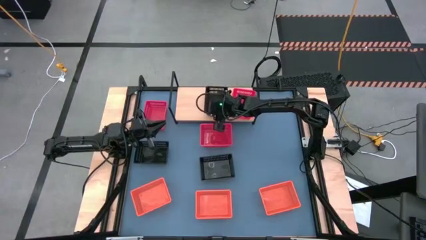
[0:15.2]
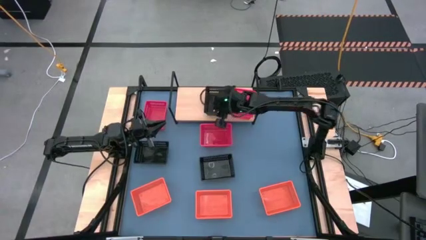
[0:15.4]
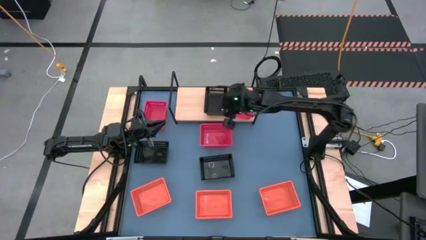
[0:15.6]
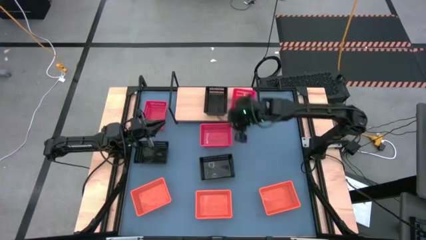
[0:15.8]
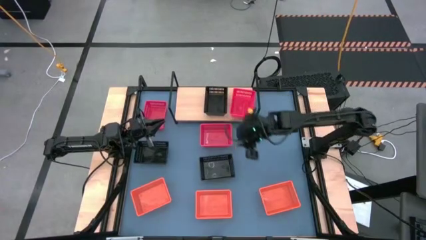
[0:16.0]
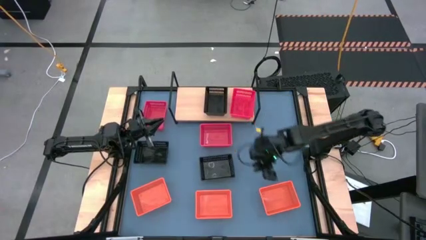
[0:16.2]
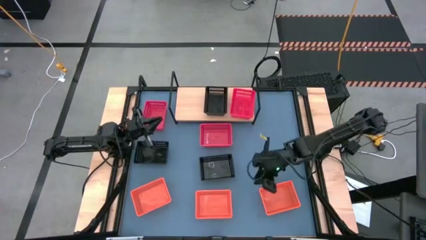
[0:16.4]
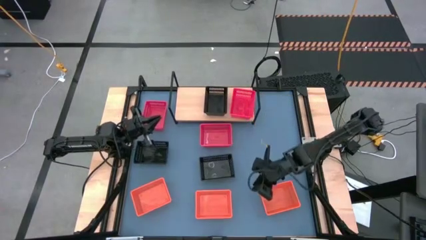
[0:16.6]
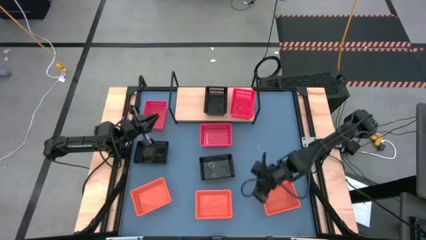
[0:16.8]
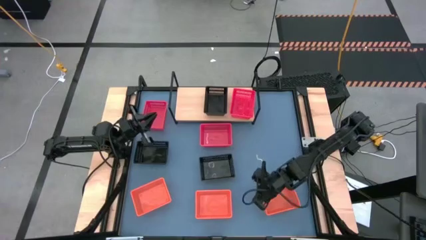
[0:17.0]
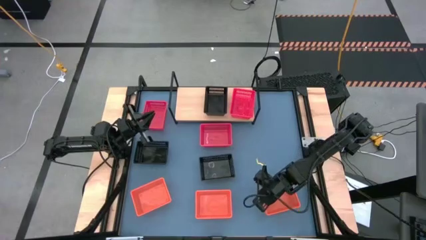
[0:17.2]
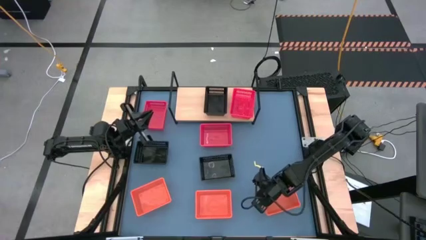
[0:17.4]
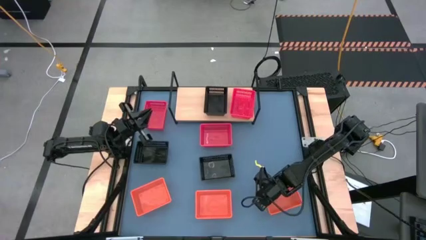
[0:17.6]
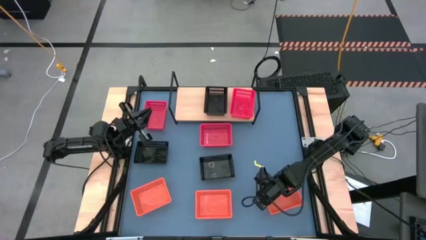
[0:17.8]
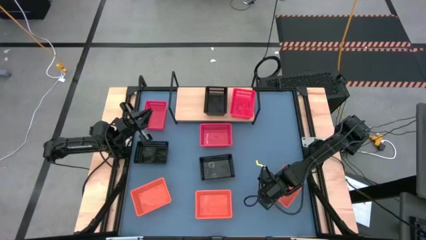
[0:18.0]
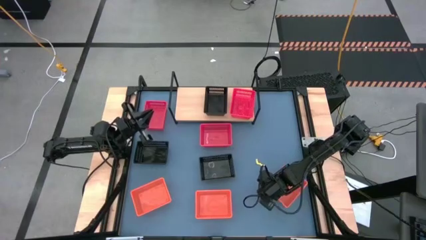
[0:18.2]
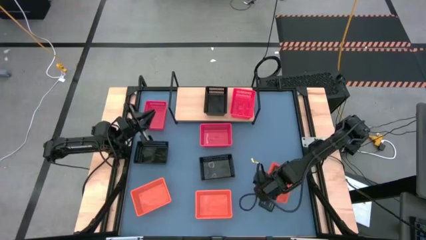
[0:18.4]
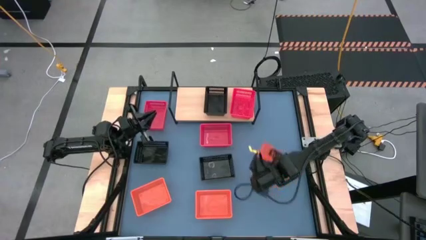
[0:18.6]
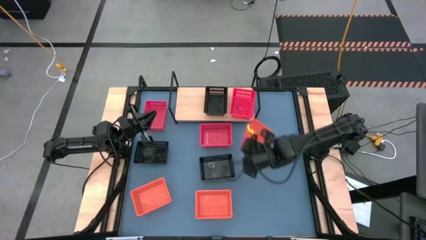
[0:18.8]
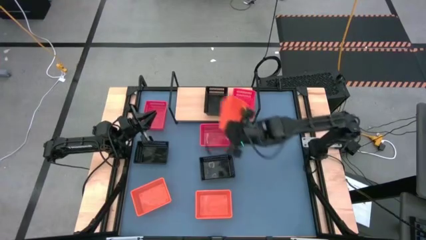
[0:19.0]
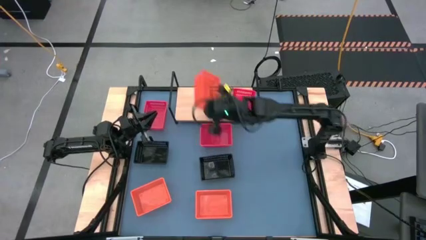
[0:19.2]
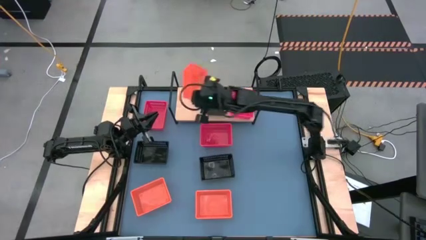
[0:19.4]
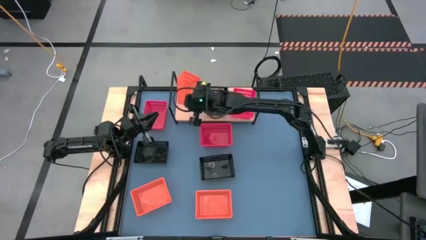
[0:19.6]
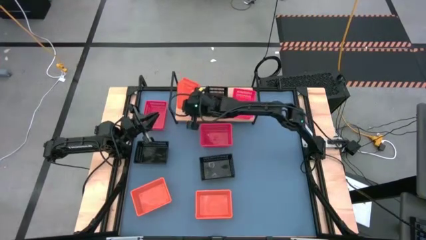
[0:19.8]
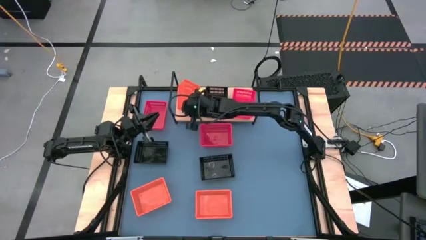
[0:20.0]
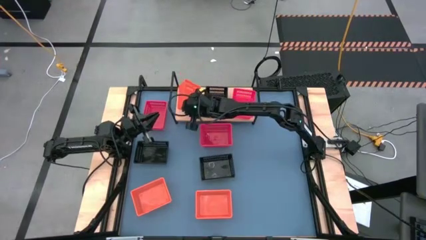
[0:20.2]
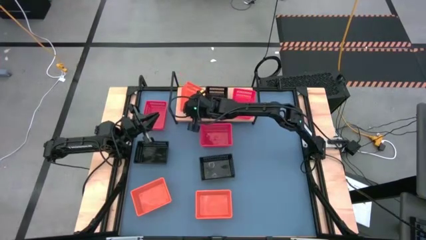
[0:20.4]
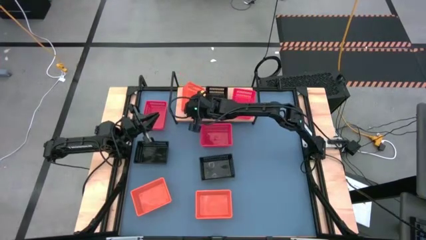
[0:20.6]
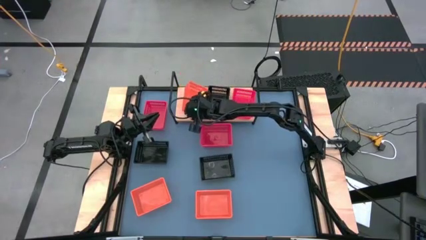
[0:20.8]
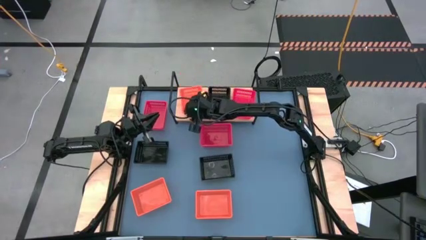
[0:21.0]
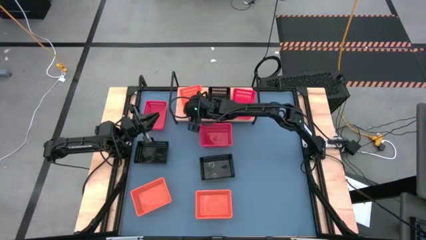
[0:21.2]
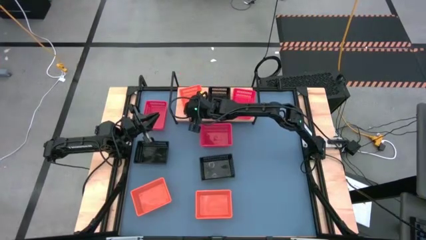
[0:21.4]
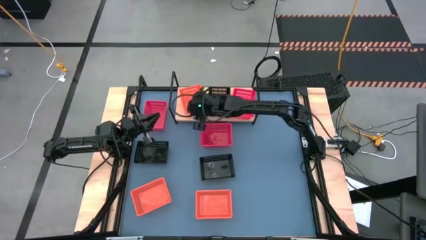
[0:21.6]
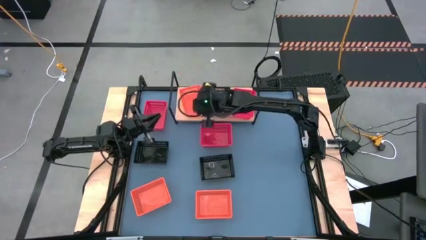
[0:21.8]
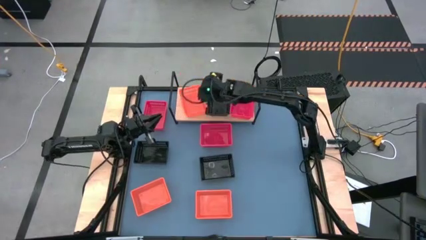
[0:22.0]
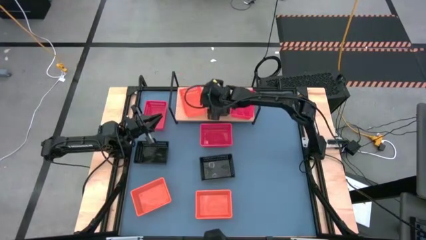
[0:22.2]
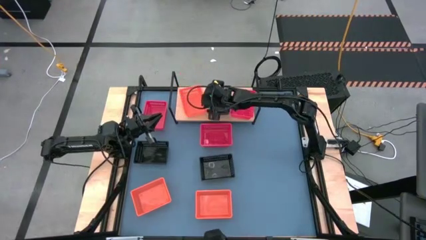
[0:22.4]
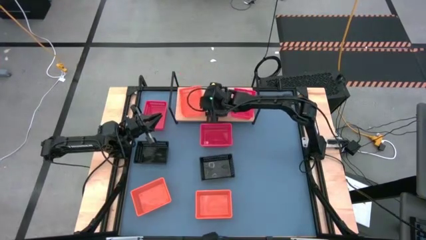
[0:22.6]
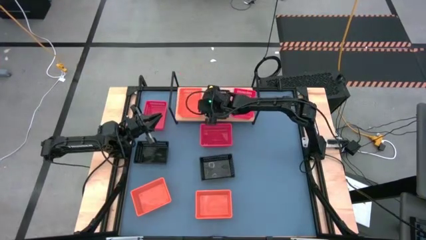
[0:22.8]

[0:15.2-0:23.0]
Task: Stack baskets on shelf by color
Put the bottom right orange bin on the shelf

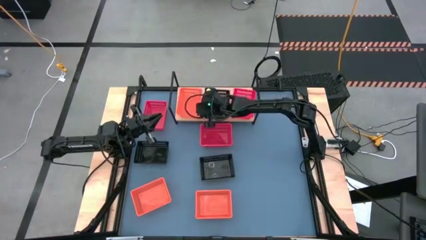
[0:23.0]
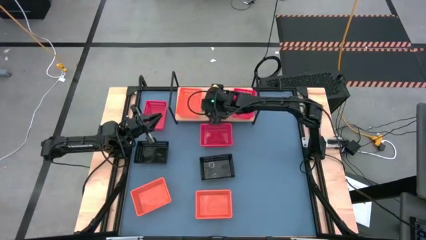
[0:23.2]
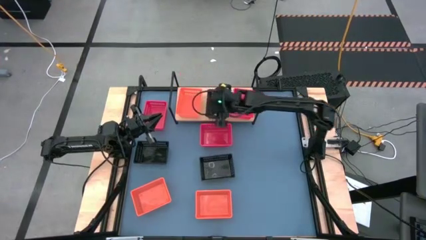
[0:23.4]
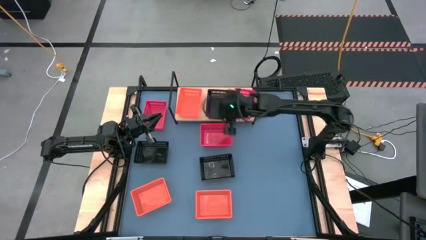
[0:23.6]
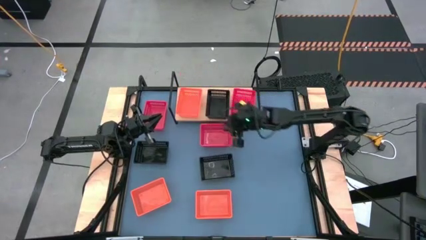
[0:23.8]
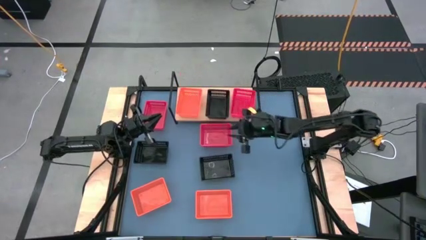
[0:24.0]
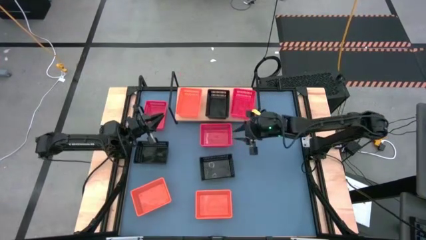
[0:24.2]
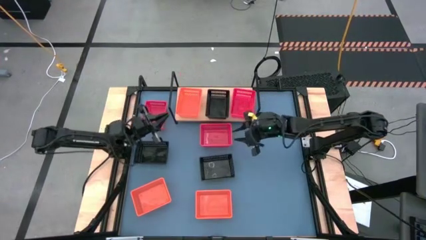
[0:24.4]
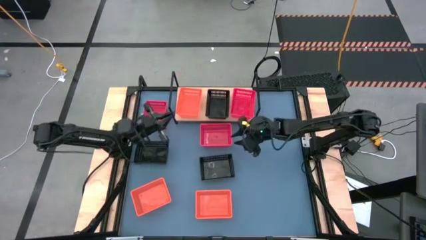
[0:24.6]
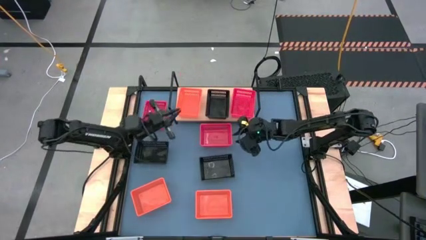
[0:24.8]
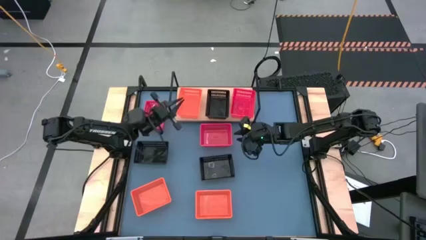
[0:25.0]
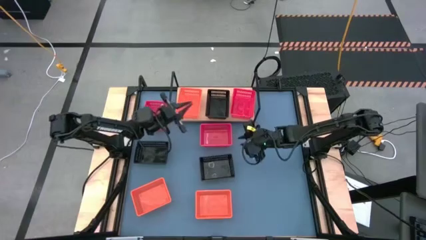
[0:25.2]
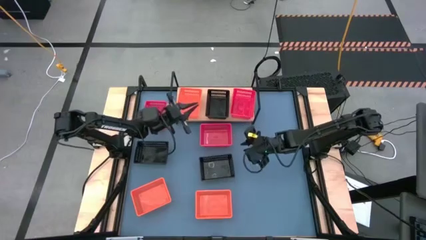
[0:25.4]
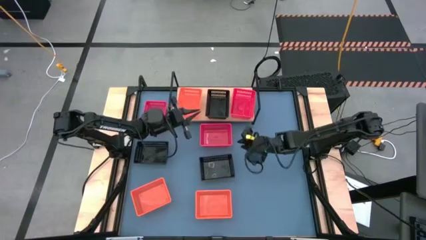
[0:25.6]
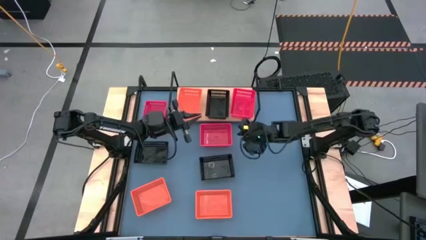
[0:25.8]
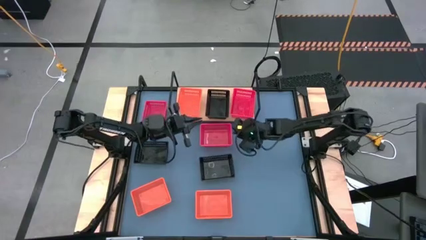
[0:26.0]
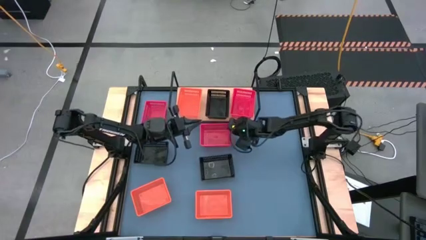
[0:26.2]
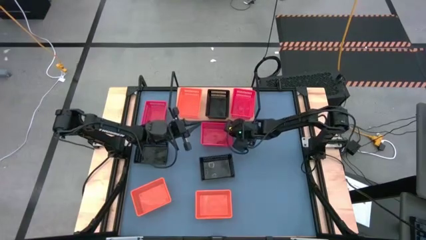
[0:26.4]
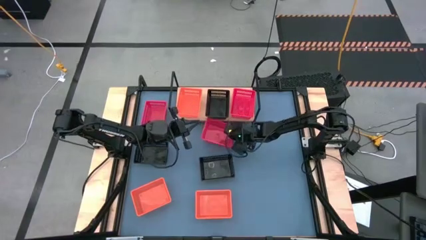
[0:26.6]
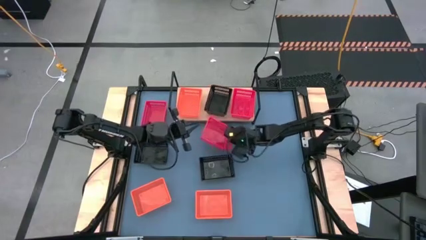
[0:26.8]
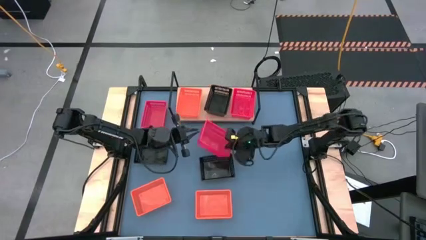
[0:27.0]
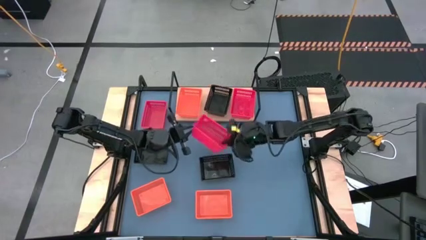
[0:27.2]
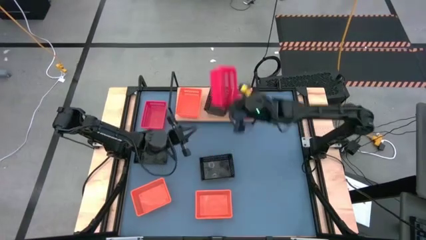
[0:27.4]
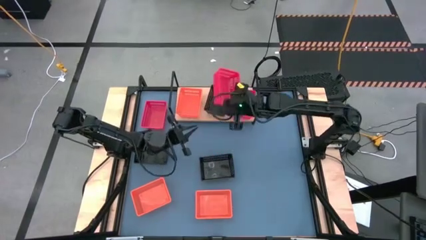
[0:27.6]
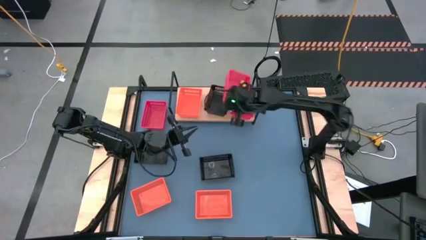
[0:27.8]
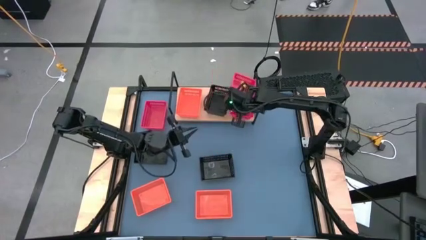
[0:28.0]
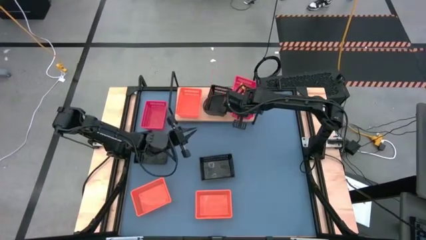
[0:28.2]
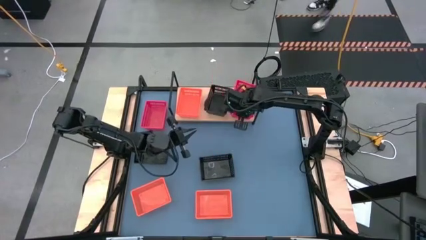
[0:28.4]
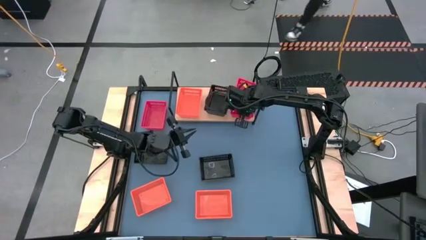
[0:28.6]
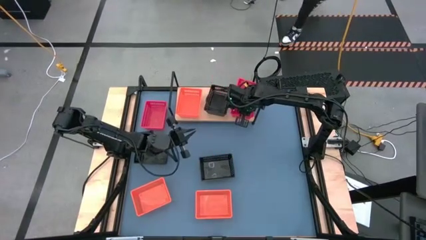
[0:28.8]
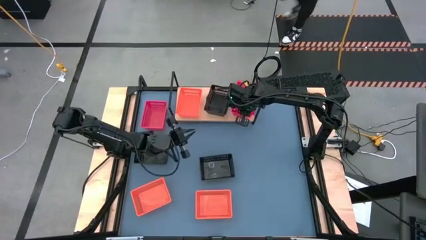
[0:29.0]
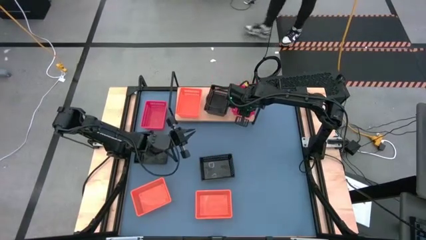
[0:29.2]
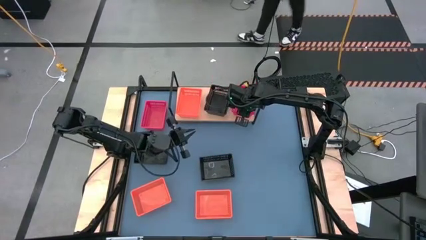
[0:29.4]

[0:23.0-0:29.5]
Stack the right red bin on top of the red bin on the shelf

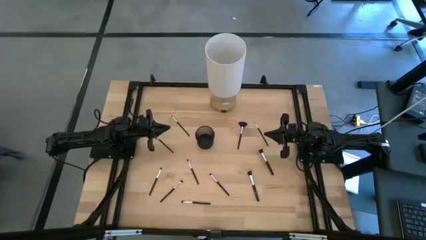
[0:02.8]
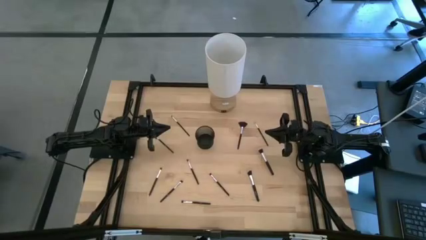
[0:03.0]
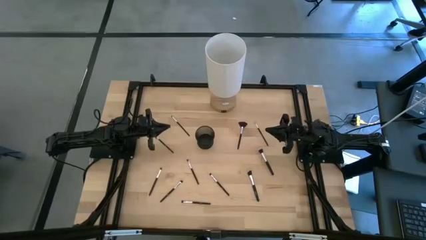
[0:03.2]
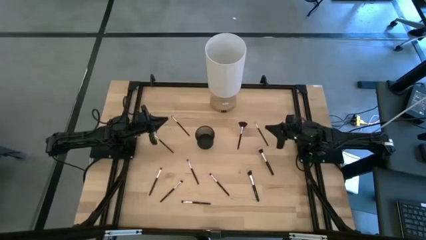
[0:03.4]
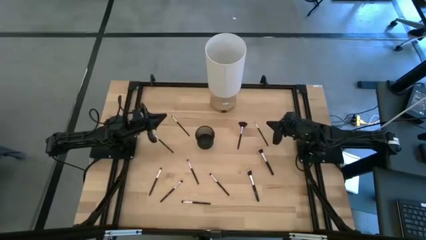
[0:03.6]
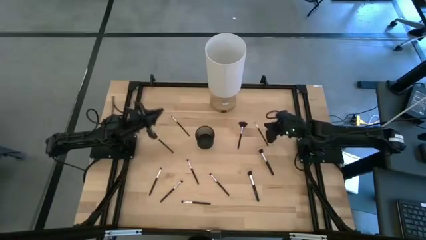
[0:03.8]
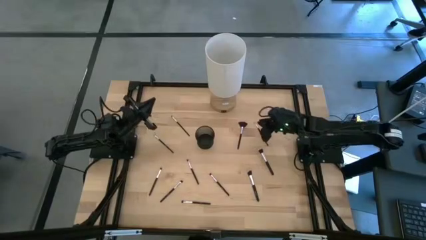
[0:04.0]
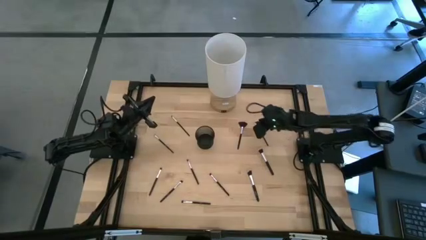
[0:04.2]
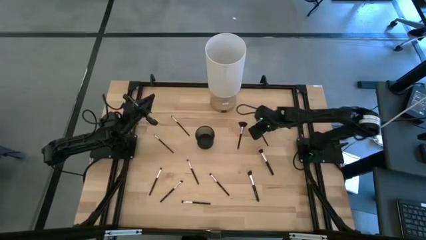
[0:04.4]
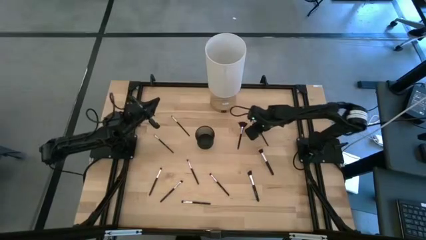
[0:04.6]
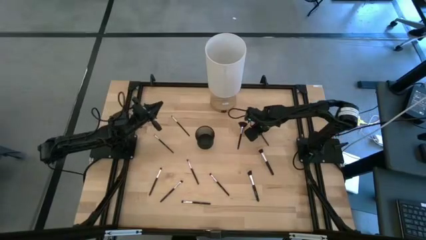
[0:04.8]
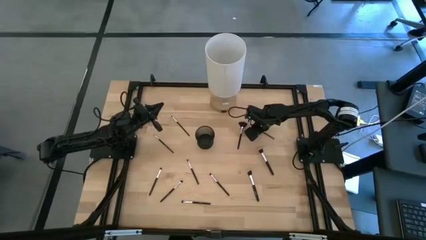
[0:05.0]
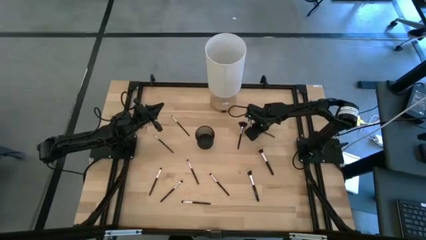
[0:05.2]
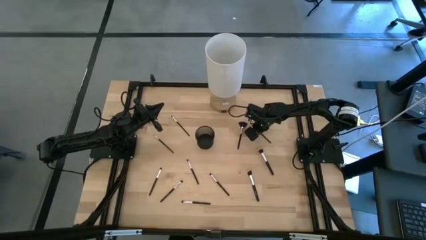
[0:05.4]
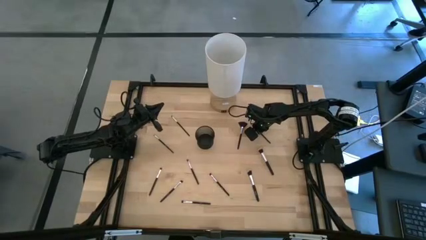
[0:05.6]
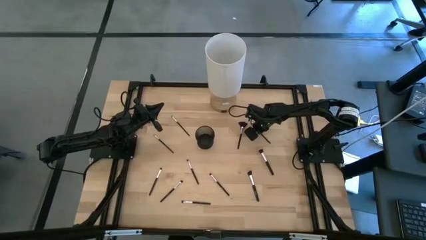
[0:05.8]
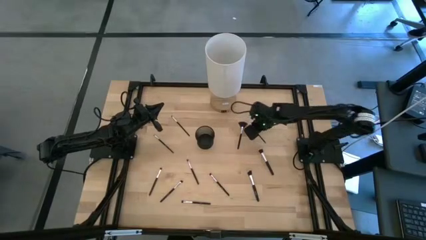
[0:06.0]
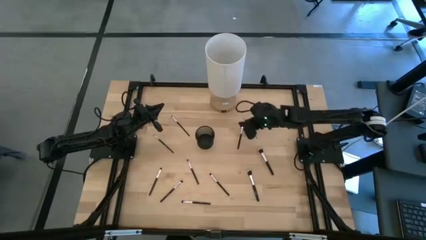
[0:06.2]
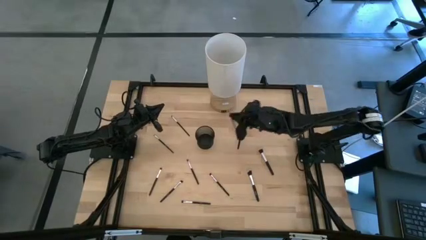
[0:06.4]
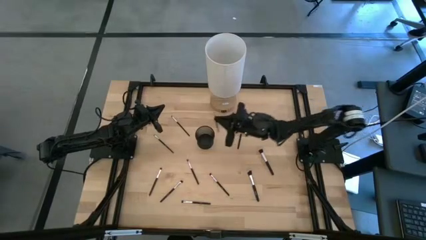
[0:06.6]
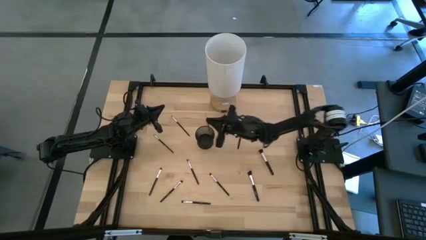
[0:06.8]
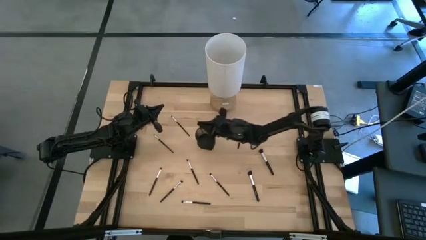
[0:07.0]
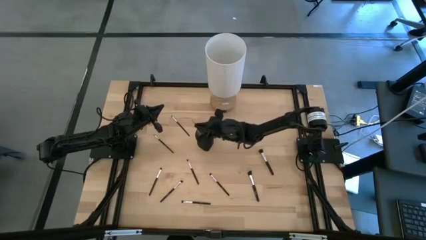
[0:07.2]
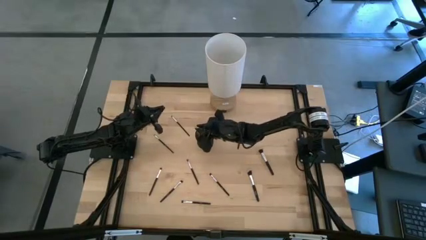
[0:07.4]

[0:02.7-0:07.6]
Task: Put items in baskets/containers
Put the eyeshadow brush into the holder
